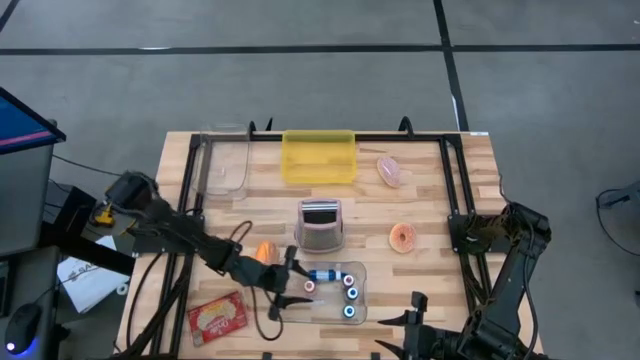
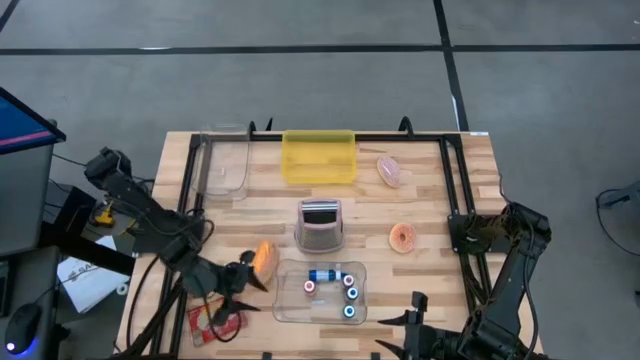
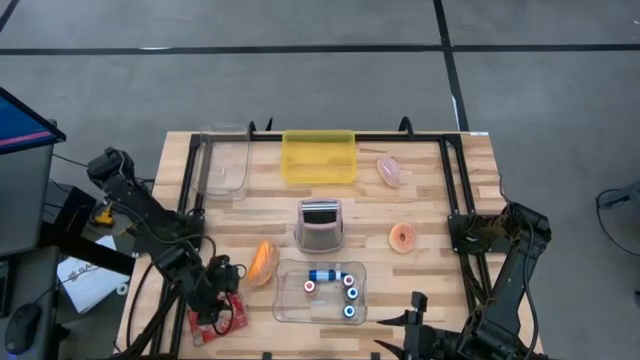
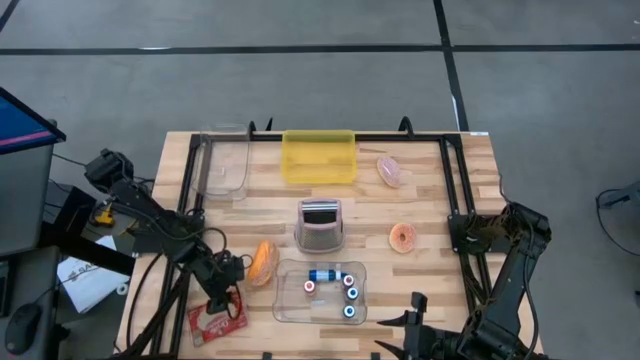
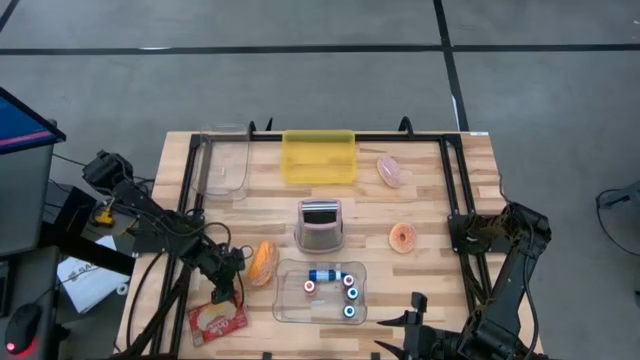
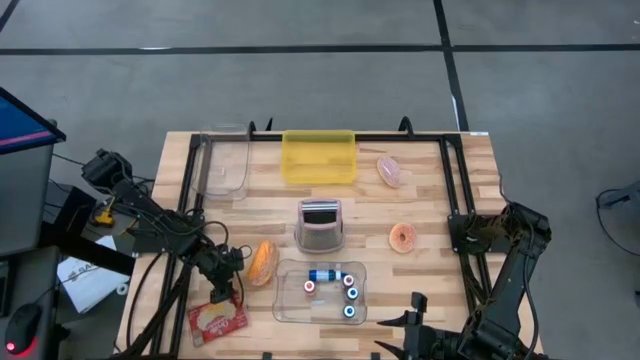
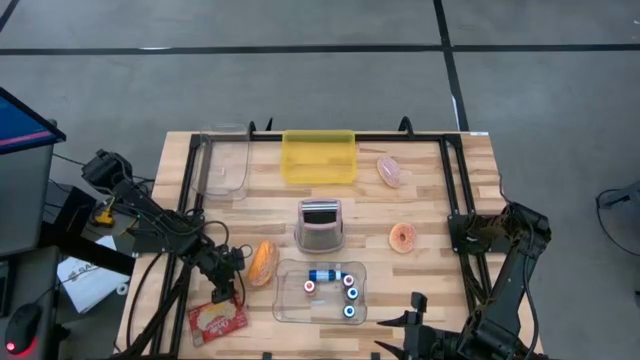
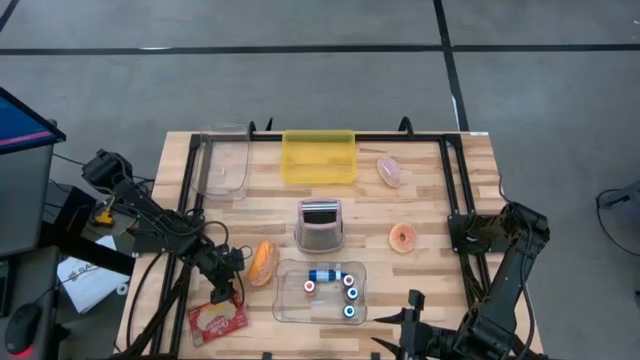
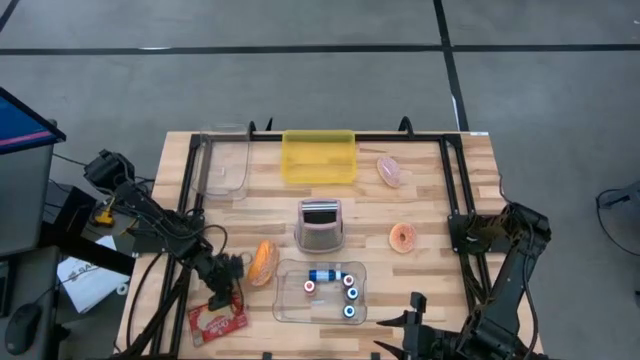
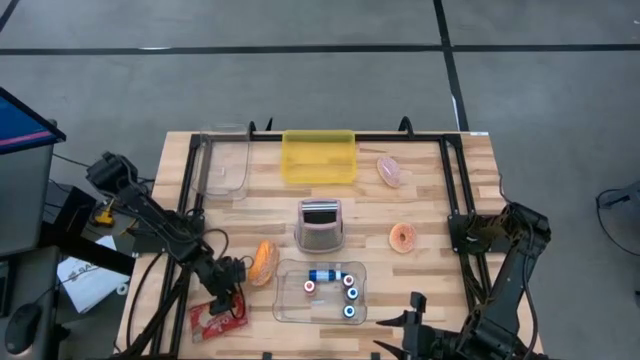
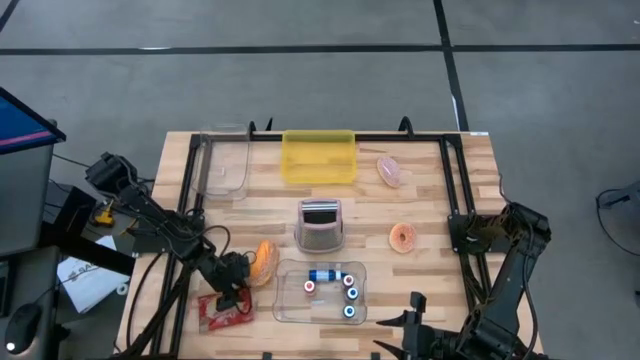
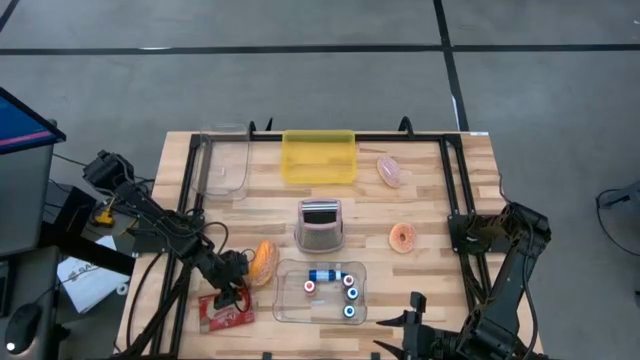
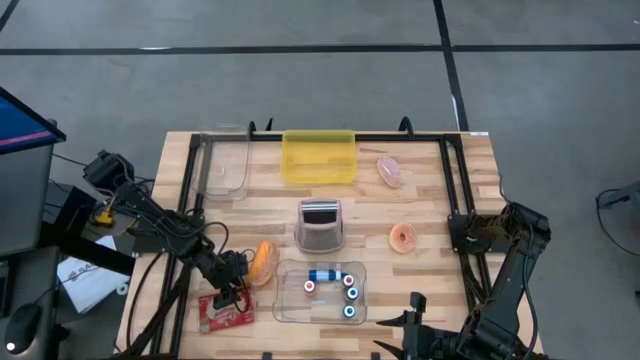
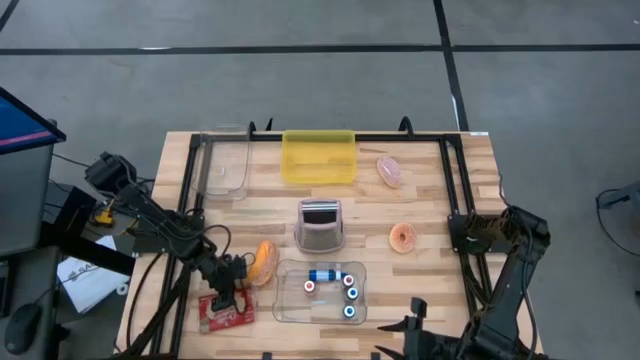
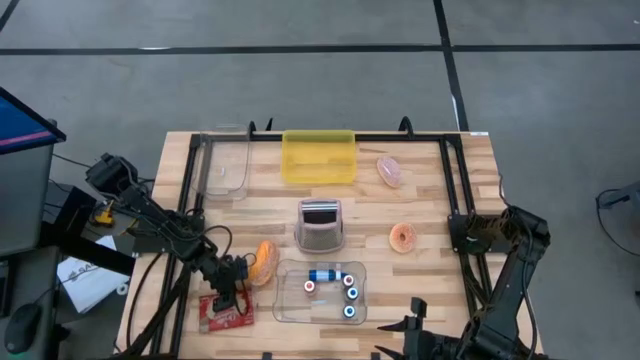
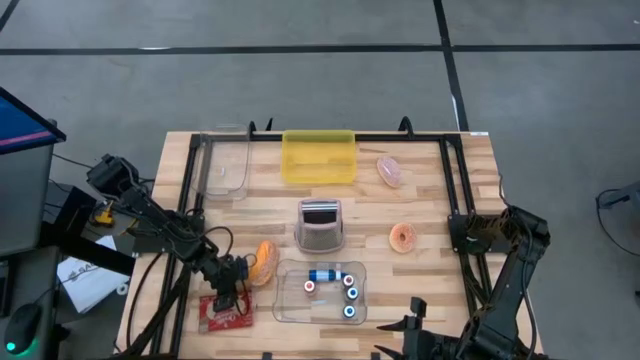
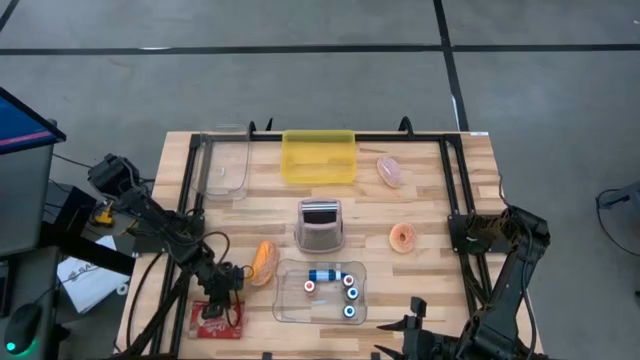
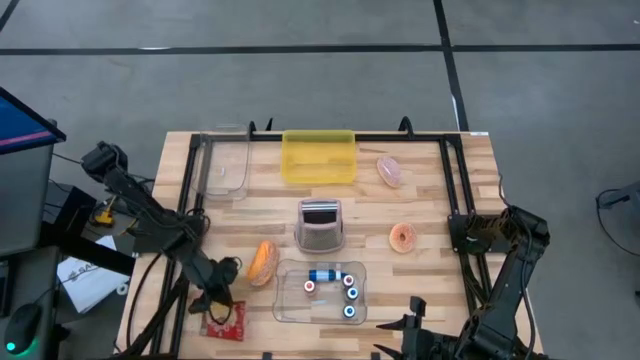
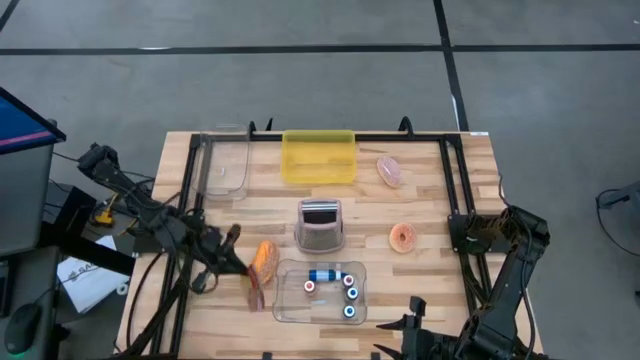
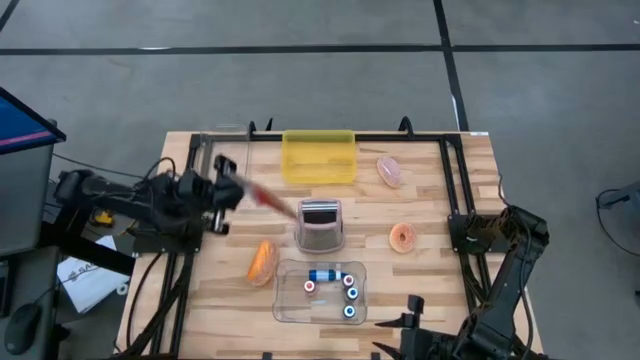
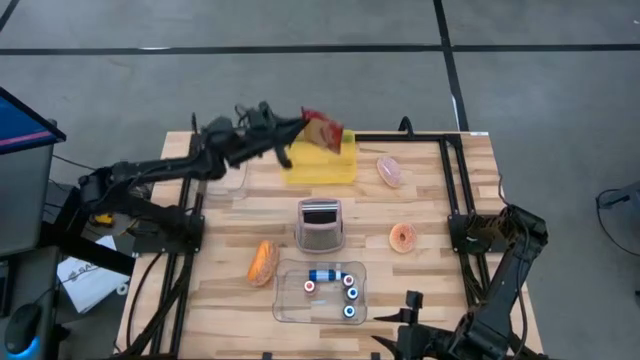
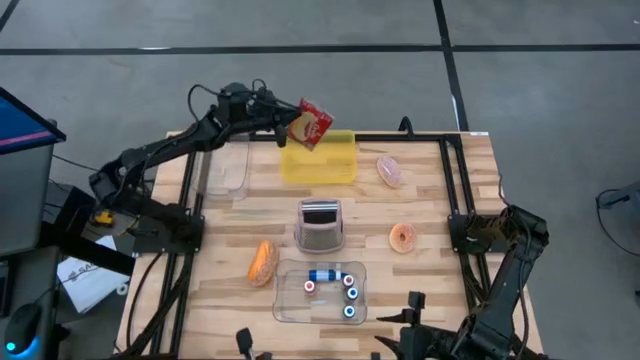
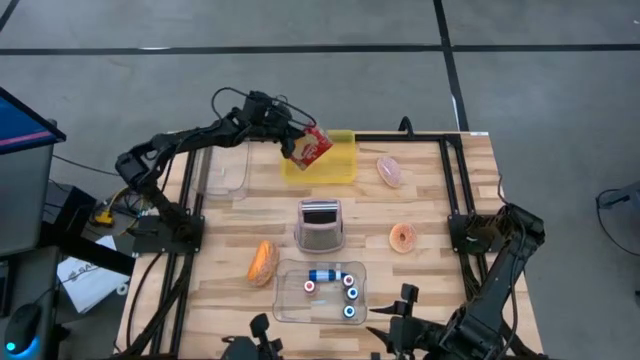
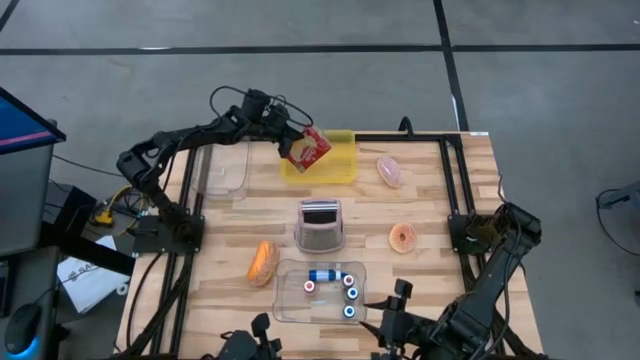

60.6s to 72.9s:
Put the popcorn bag into the yellow bin
